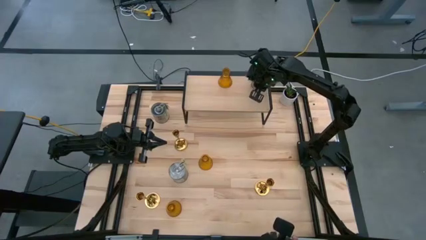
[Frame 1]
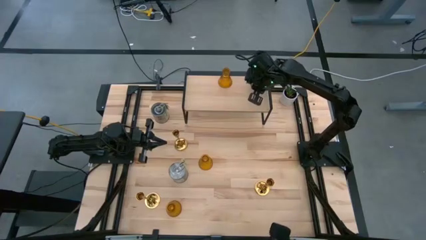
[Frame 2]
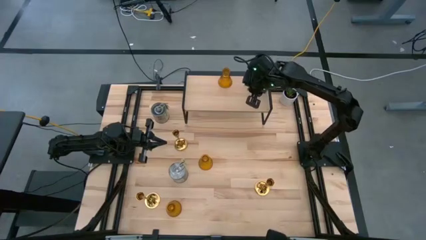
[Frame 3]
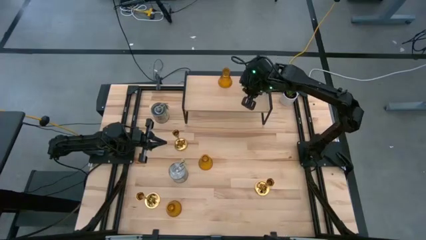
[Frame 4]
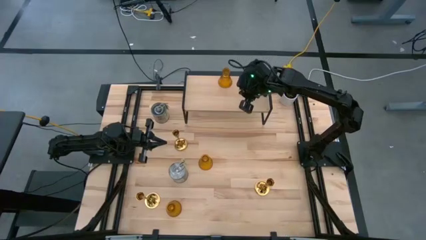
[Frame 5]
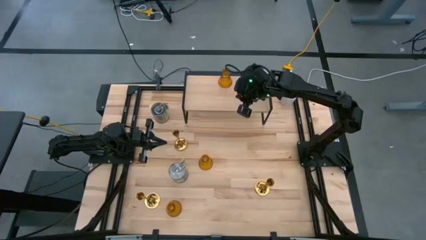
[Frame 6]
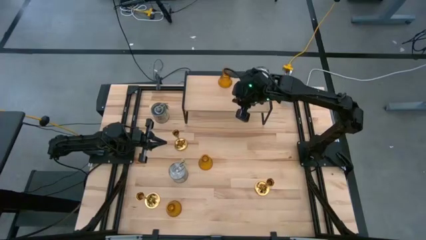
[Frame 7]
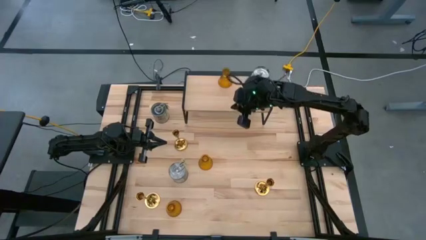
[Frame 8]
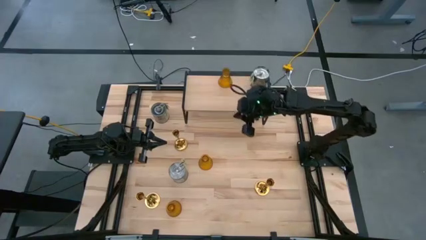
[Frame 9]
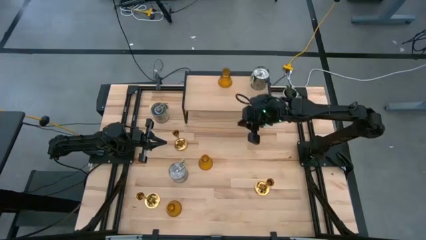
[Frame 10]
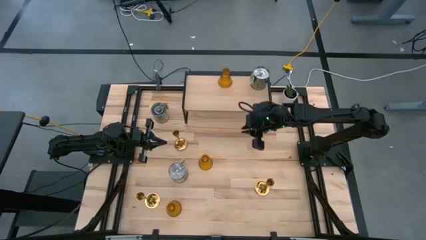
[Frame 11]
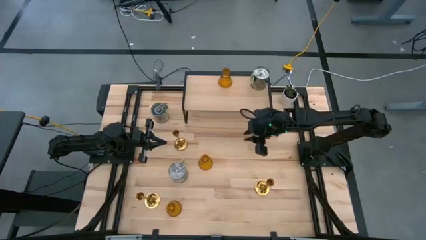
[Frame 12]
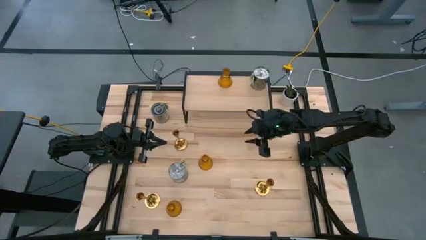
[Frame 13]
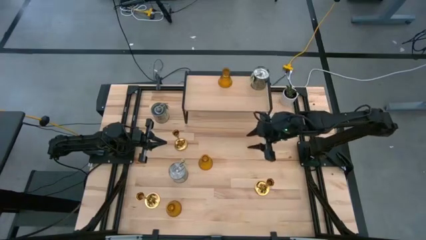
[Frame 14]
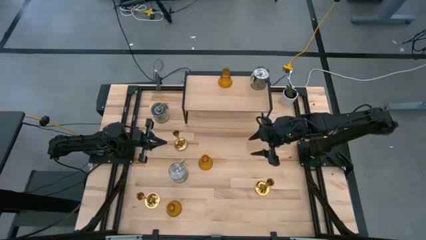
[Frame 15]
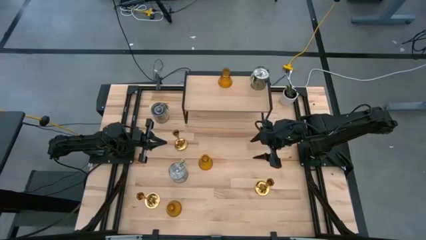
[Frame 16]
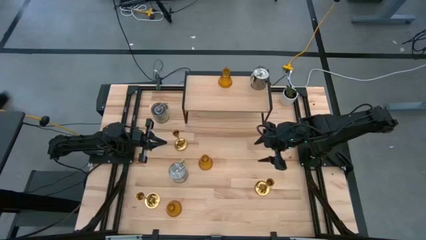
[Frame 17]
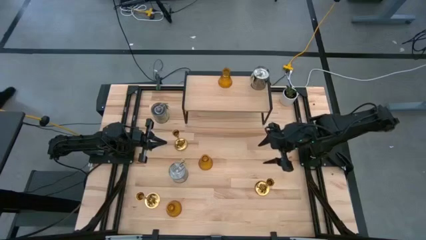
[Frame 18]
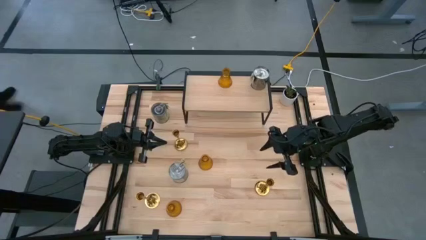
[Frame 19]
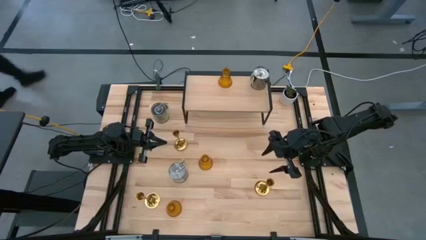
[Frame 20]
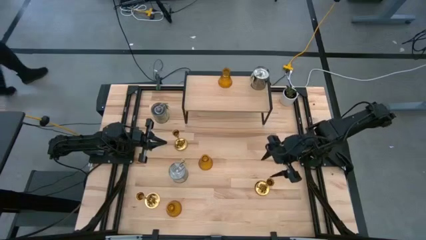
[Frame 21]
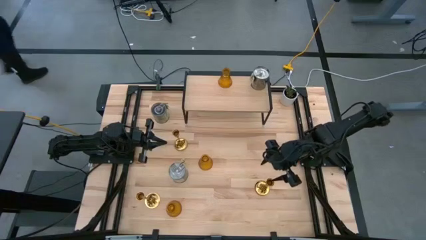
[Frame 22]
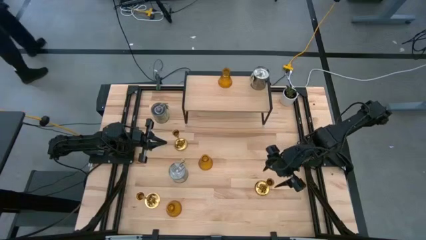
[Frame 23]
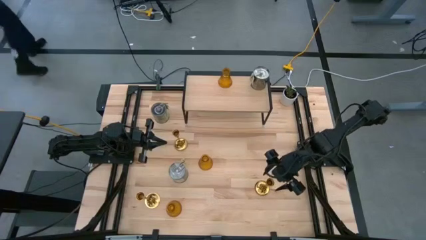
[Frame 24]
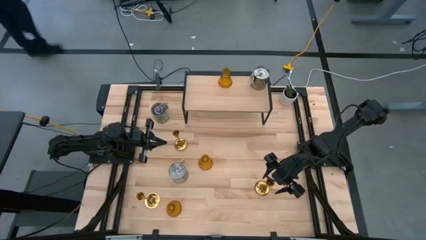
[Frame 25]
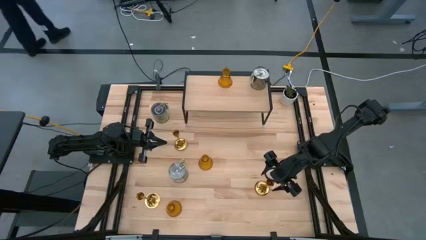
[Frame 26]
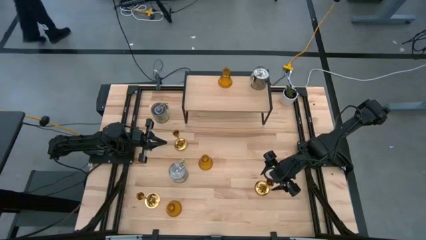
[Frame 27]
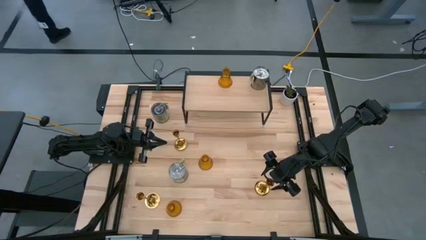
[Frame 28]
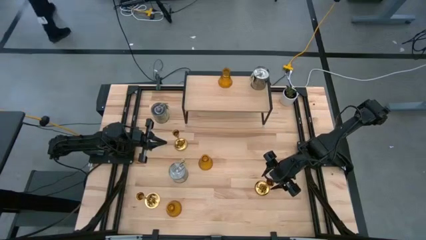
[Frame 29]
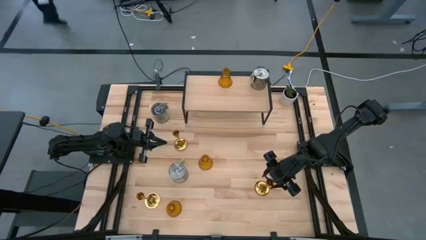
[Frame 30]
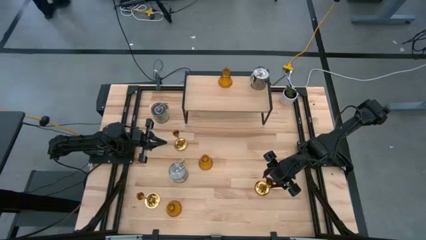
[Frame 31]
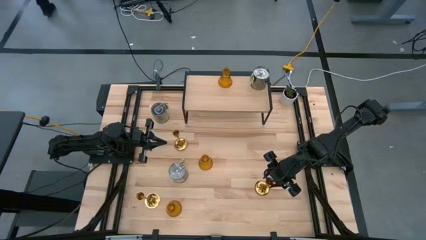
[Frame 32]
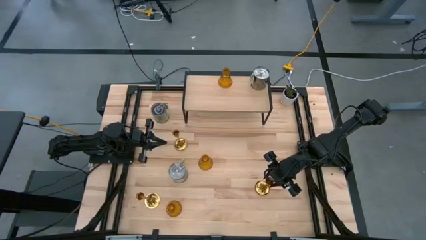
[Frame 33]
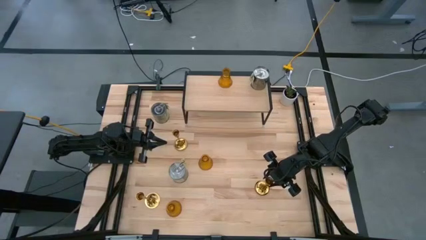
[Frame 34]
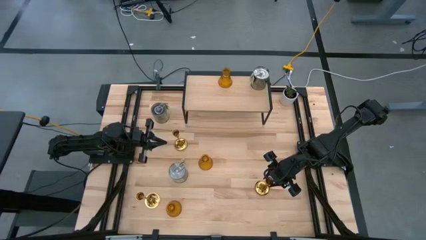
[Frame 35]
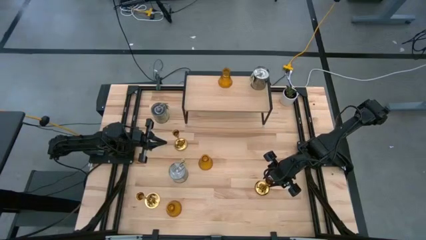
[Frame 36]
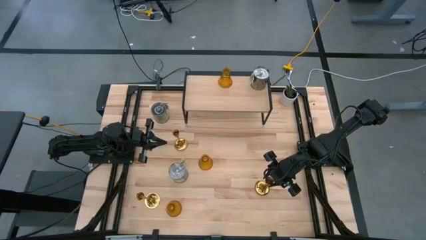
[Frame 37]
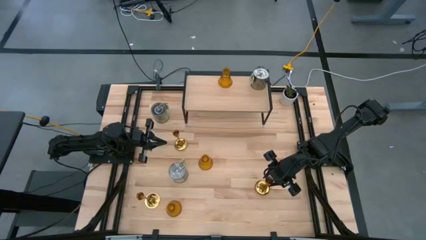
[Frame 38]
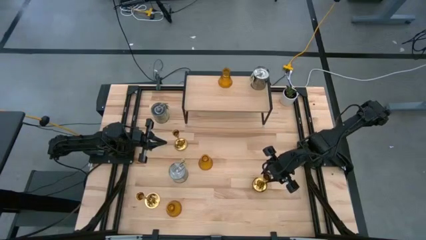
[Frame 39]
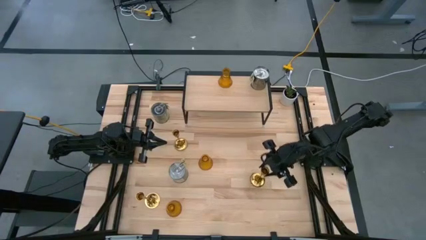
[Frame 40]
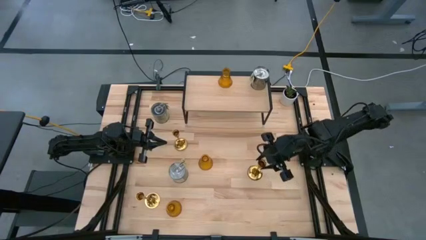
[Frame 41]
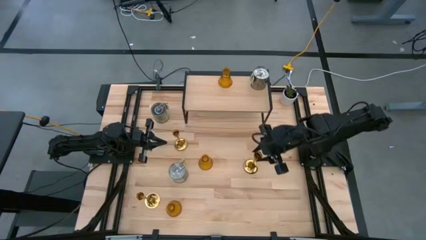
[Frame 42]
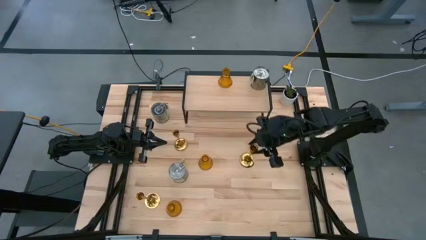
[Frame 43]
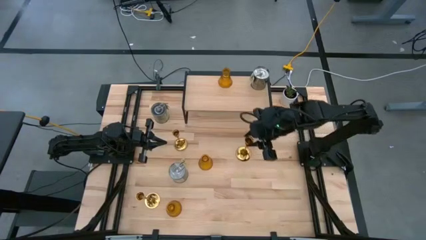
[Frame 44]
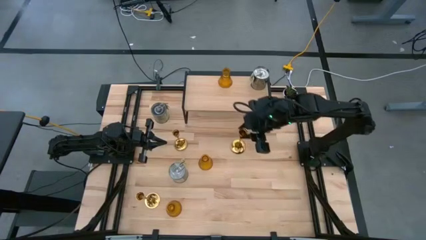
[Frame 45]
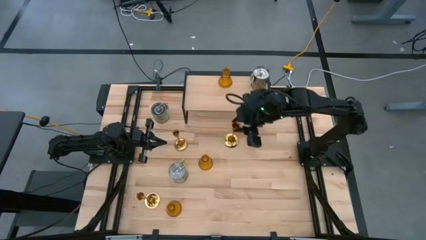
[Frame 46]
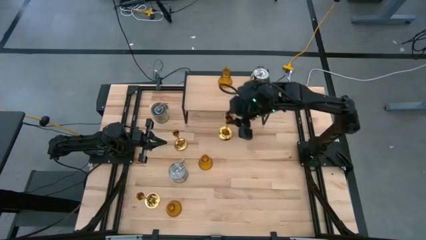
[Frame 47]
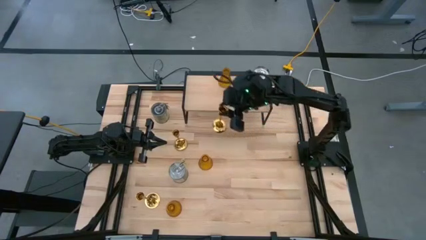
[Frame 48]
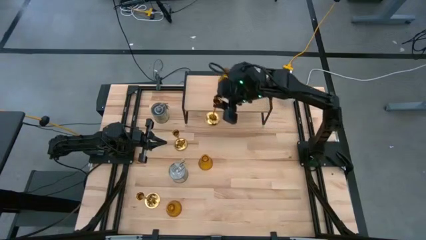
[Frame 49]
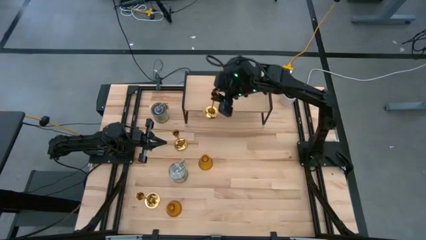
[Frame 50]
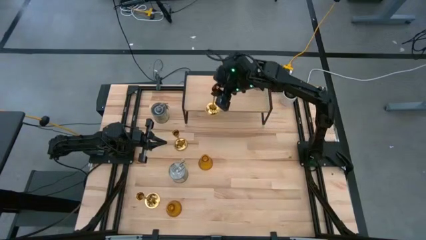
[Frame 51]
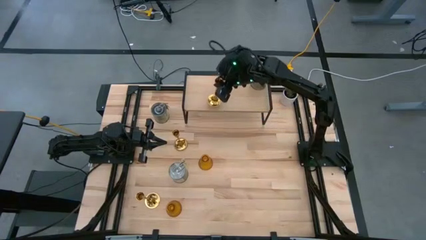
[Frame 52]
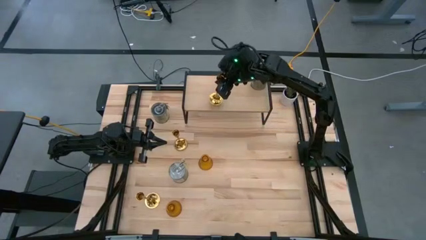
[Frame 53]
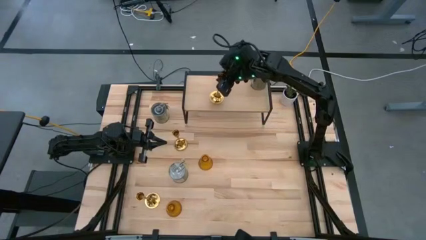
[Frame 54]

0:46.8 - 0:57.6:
Task: Pick & Place candle stick holders
Put the middle gold candle holder on the shelf

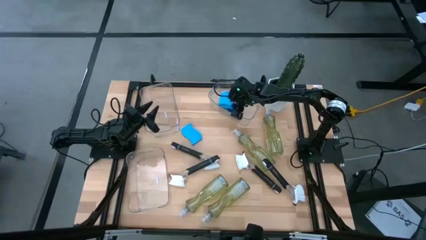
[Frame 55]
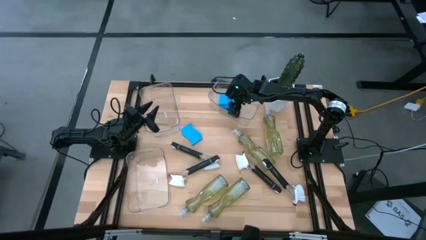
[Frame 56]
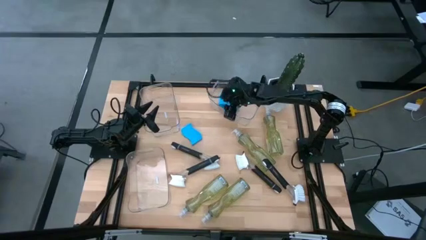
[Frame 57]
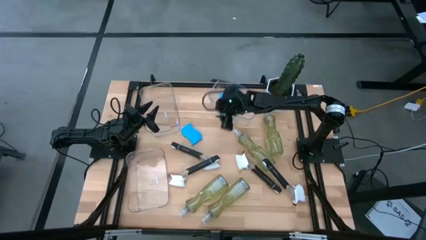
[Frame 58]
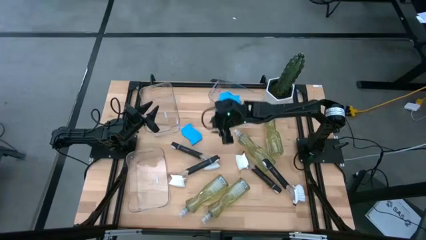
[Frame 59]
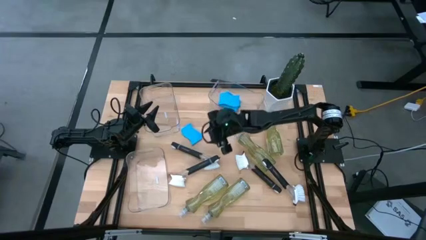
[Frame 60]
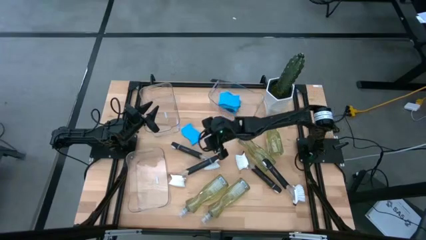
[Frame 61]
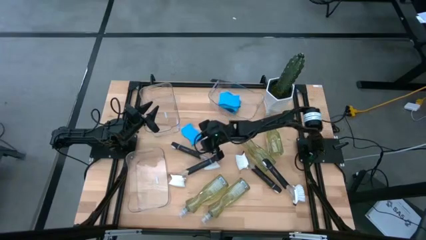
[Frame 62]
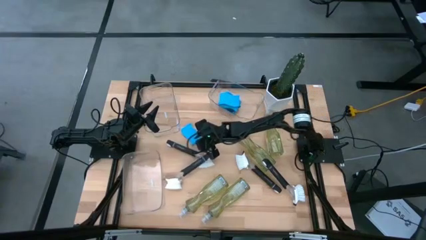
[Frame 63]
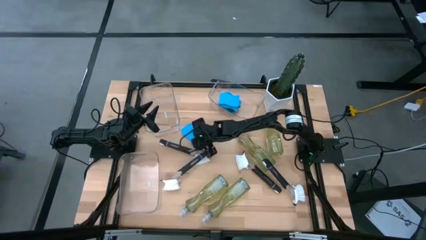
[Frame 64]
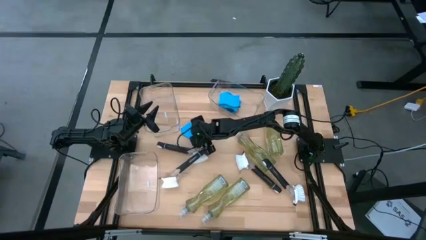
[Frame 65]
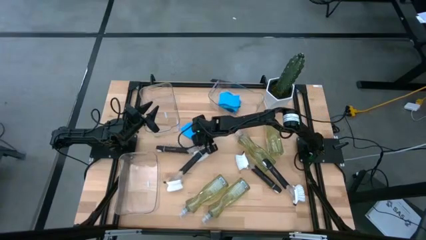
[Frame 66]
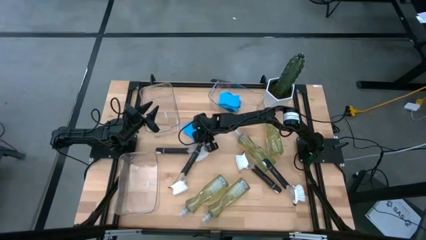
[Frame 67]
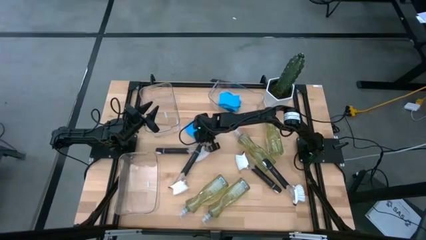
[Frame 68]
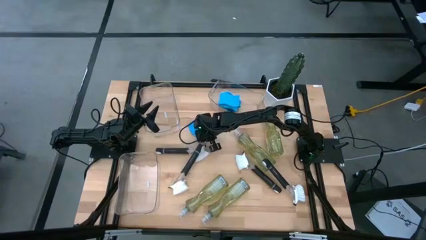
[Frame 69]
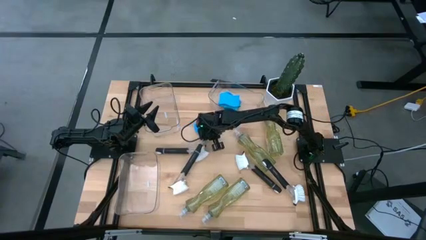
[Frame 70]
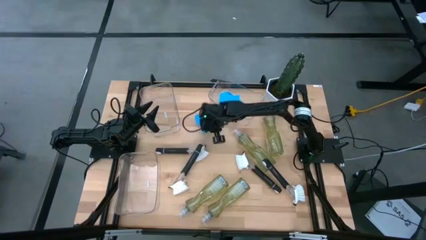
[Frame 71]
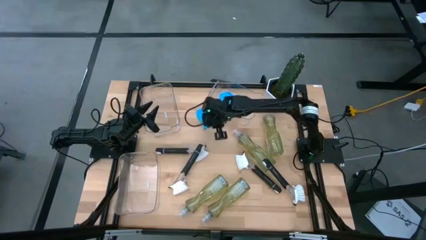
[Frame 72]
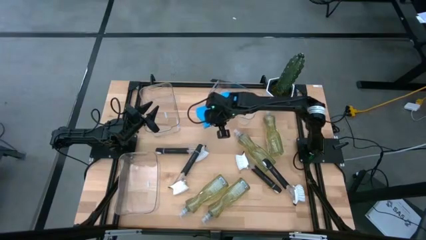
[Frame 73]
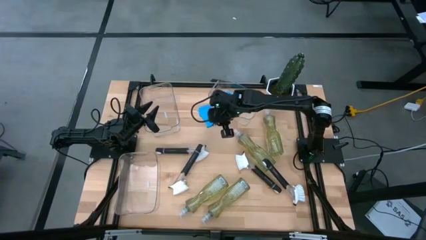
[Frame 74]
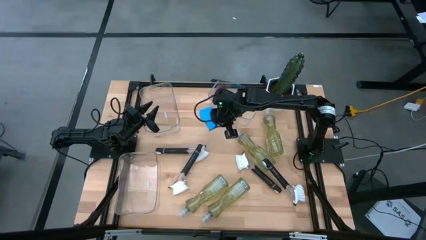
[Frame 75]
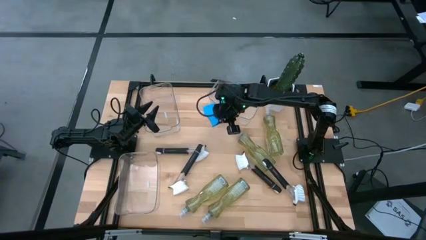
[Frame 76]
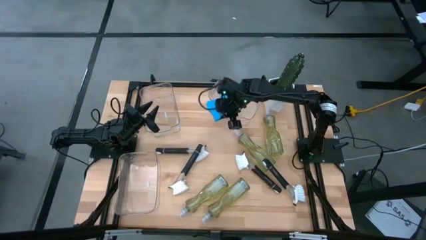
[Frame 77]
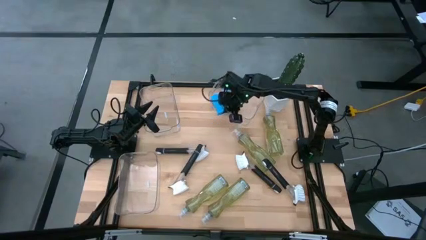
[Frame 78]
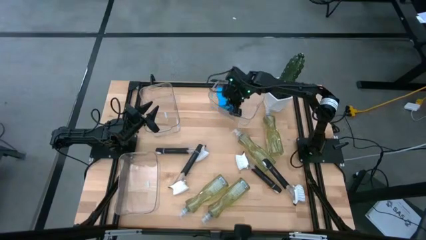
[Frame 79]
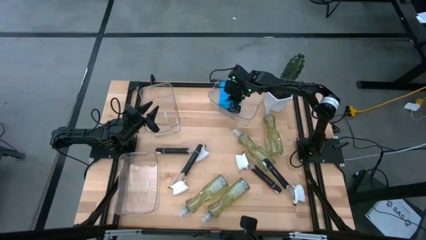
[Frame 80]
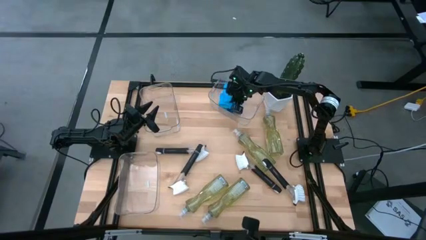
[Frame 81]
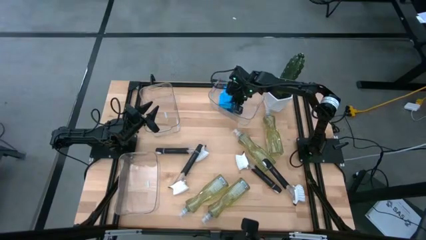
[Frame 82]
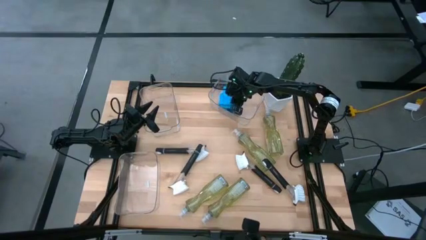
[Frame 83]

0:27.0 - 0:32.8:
Task: Pick & Place Kitchen Sink Supplies
Put the blue sponge into the top right transparent bin

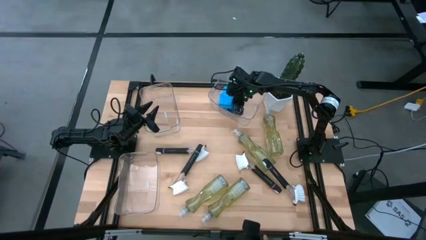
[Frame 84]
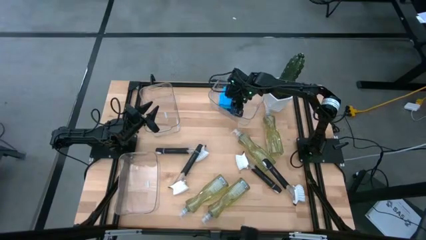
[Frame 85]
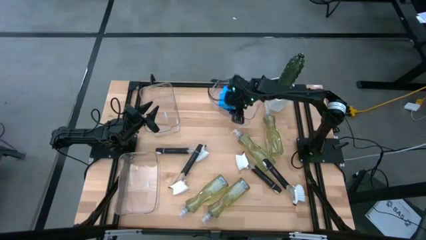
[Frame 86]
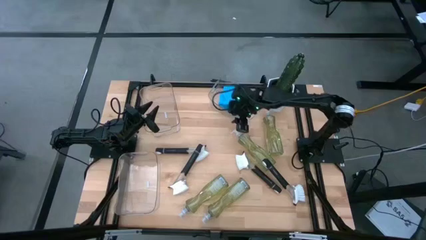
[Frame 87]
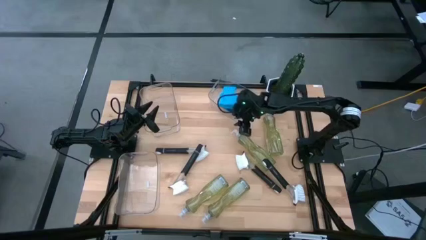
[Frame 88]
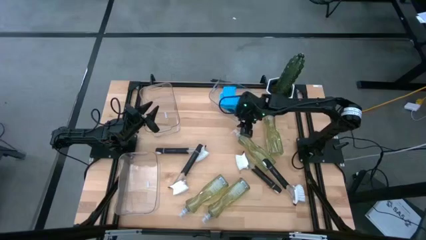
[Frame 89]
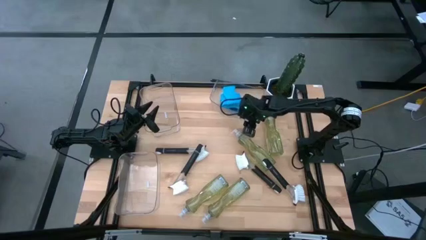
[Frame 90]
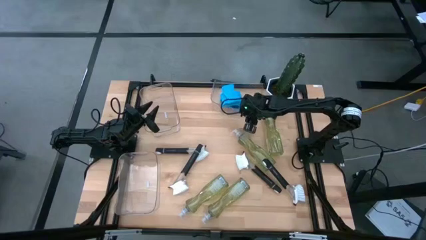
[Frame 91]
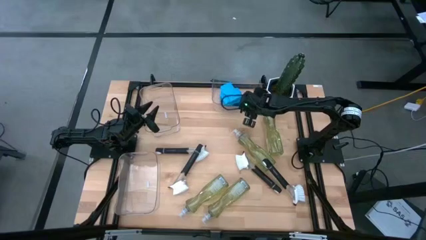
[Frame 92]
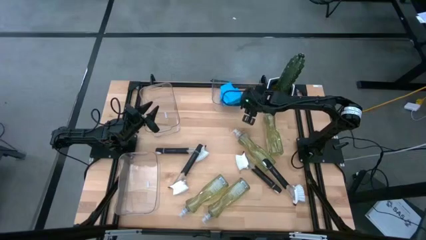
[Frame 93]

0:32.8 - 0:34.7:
Adjust the top right transparent bin on the table
